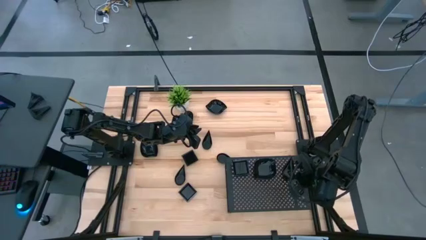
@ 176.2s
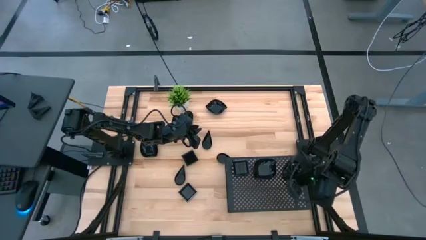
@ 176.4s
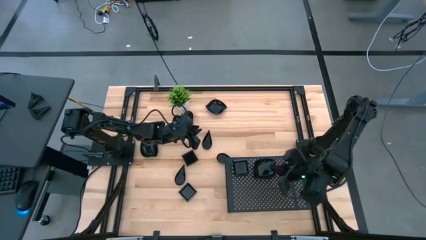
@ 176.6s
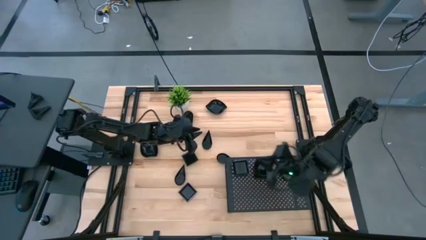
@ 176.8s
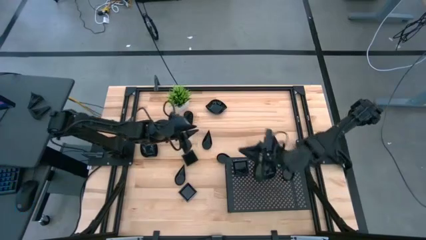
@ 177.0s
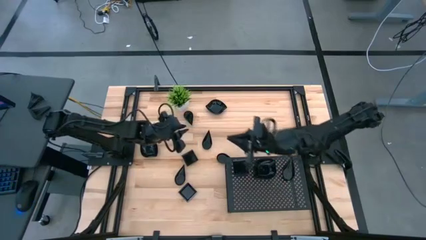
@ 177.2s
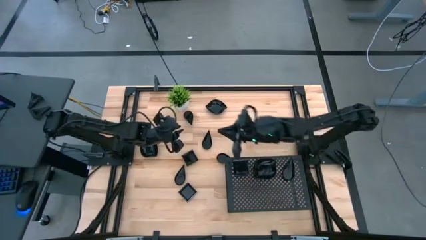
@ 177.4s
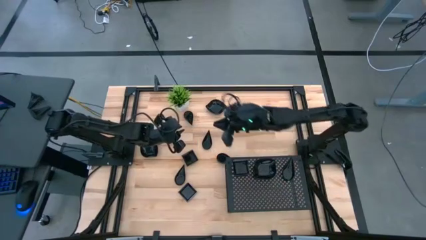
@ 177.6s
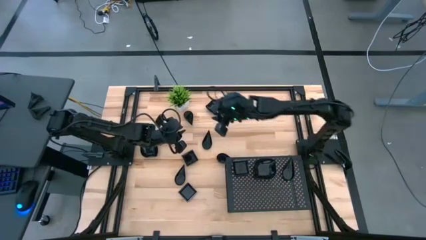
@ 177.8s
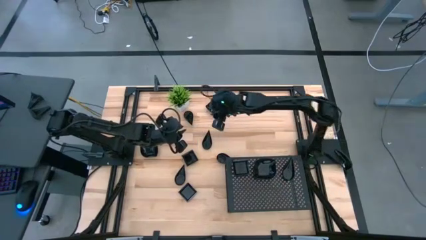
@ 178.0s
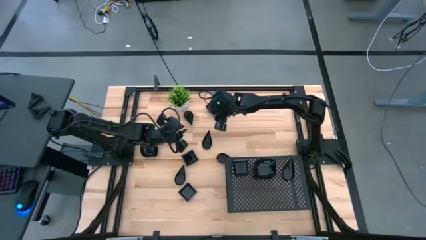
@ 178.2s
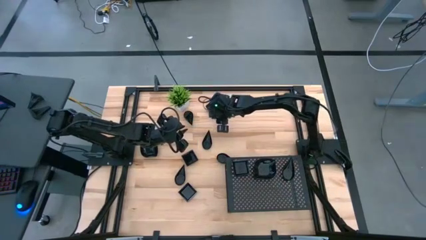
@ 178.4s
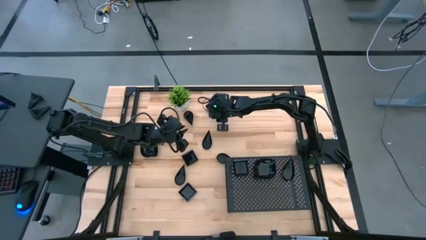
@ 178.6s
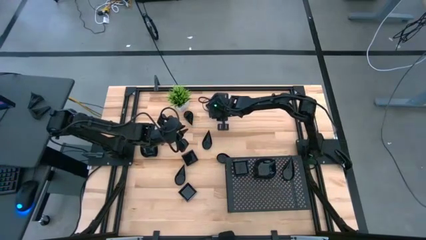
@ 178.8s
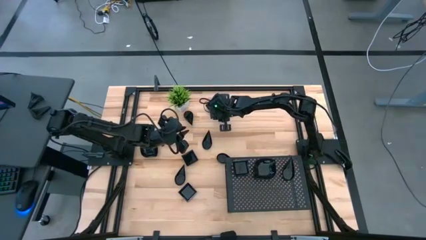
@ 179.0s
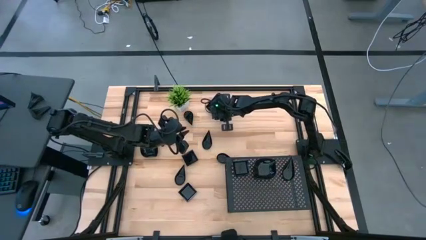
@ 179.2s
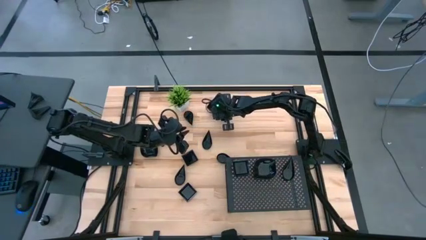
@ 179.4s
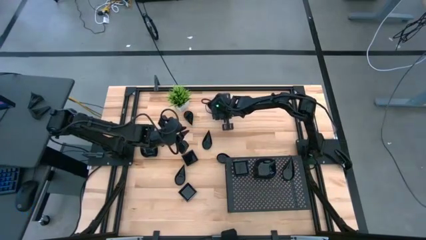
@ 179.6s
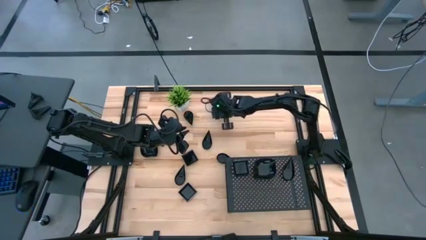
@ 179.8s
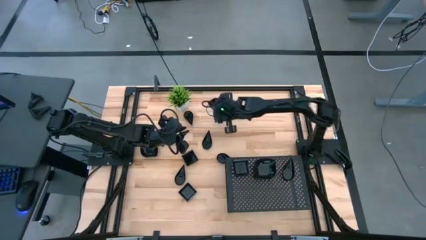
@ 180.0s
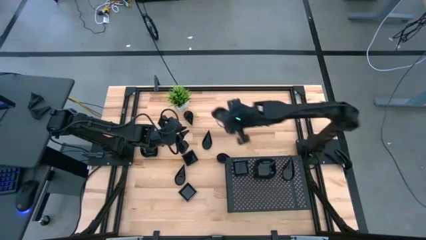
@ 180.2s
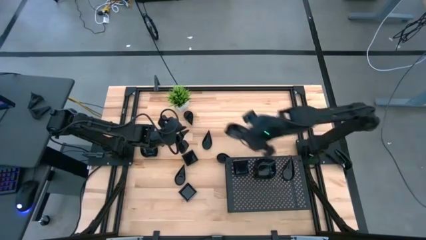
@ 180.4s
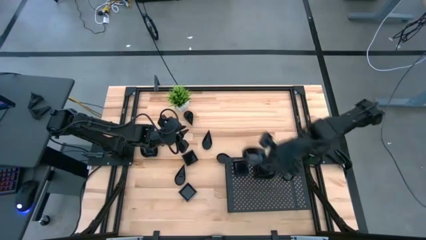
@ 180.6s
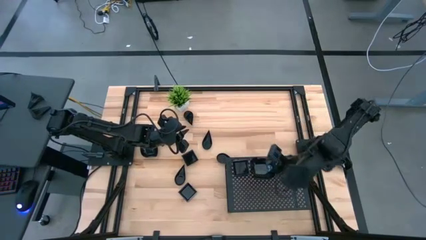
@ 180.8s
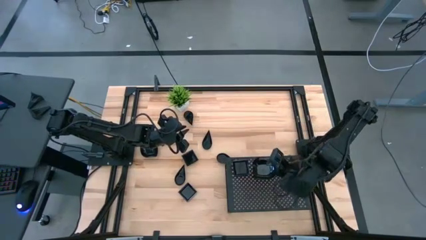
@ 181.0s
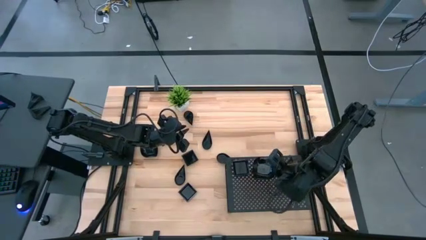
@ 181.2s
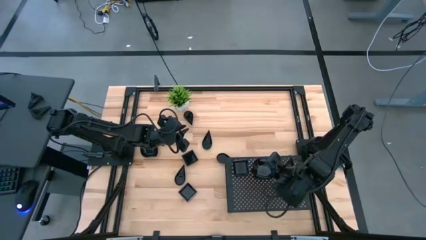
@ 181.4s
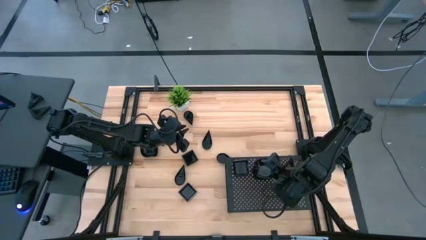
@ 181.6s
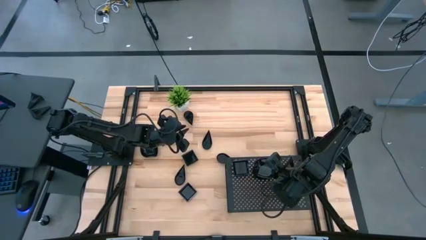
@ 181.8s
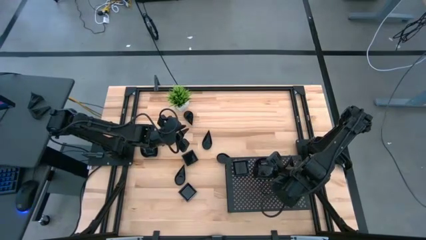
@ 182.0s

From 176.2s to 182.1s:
Task: Pick & Place Mini shaped plates
Stack the leaf shaped plate on top of the leaf shaped plate on the shelf

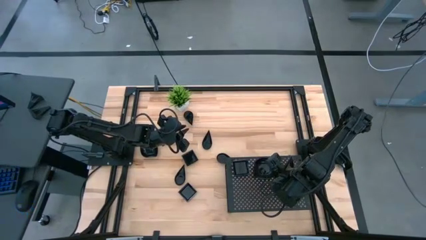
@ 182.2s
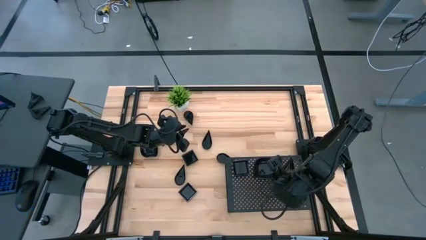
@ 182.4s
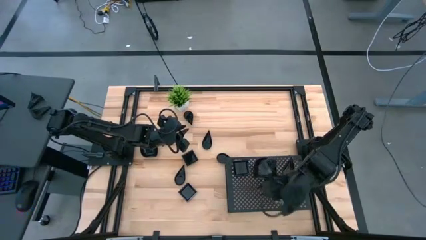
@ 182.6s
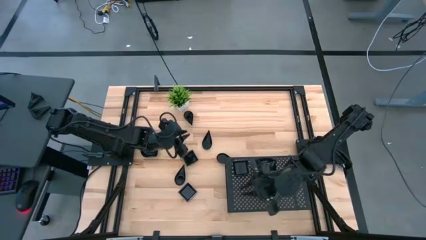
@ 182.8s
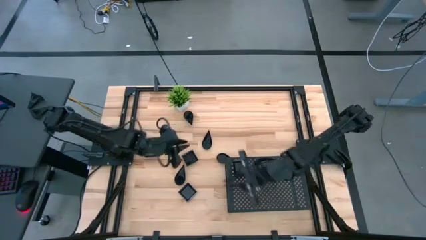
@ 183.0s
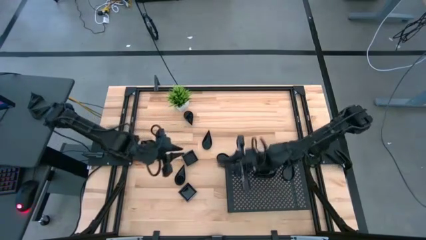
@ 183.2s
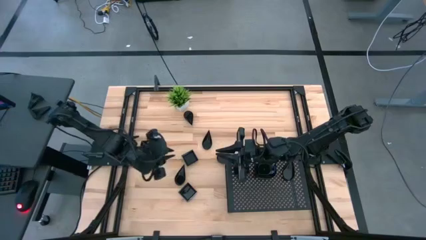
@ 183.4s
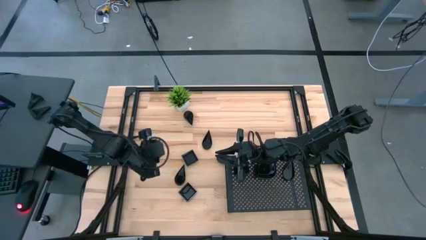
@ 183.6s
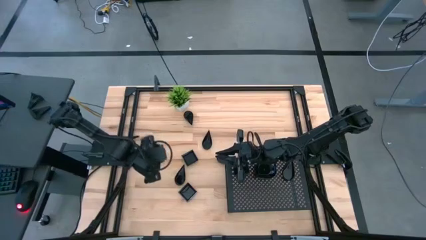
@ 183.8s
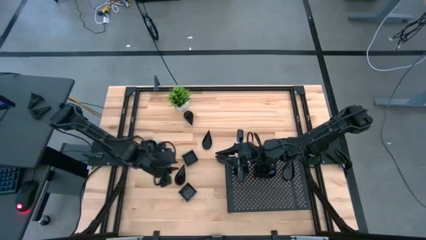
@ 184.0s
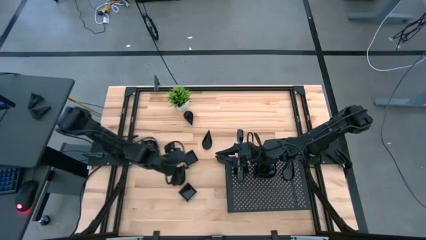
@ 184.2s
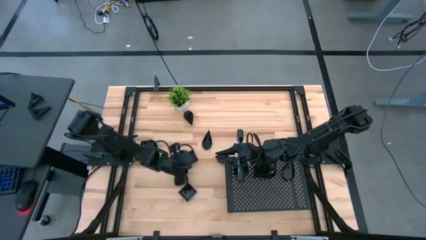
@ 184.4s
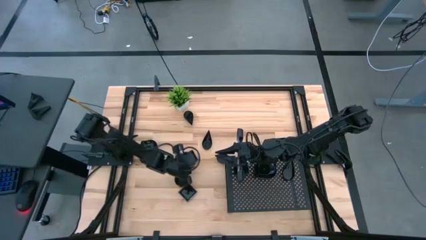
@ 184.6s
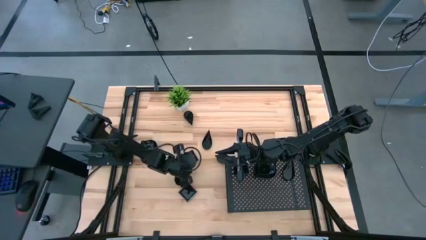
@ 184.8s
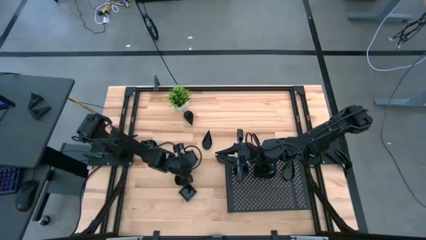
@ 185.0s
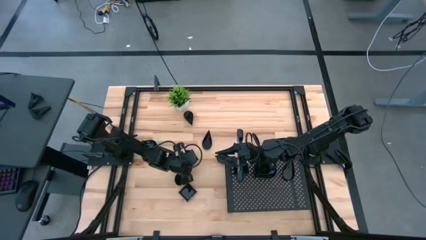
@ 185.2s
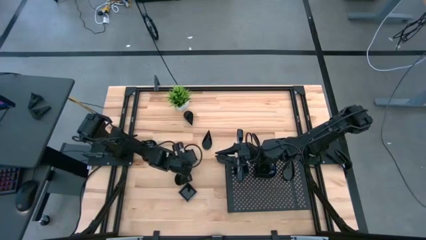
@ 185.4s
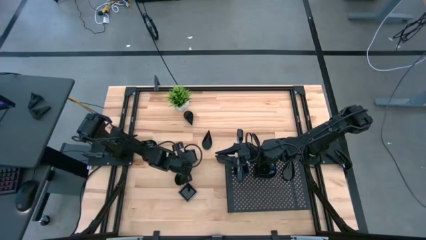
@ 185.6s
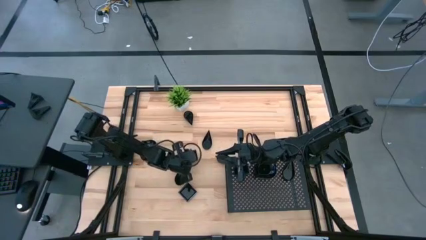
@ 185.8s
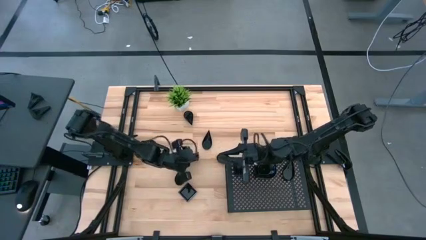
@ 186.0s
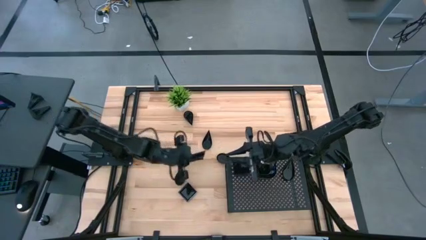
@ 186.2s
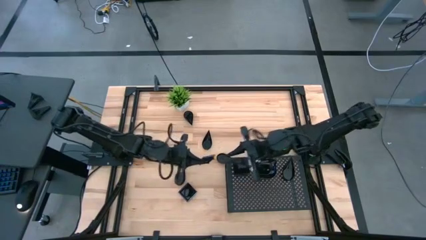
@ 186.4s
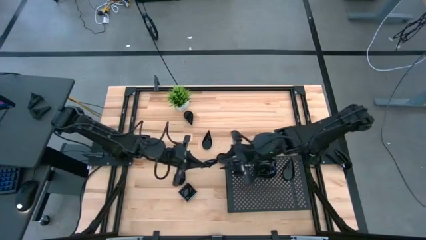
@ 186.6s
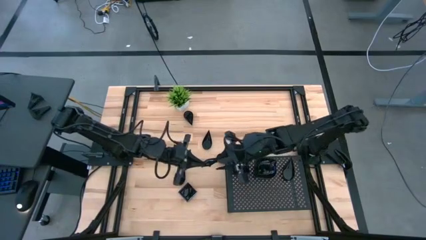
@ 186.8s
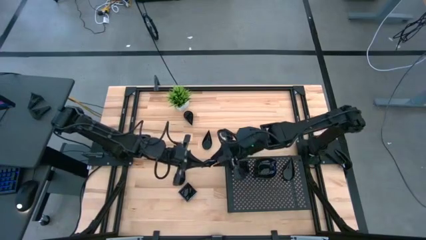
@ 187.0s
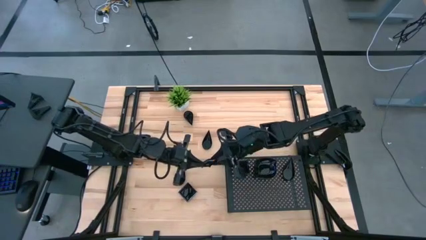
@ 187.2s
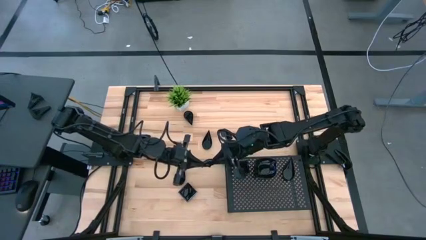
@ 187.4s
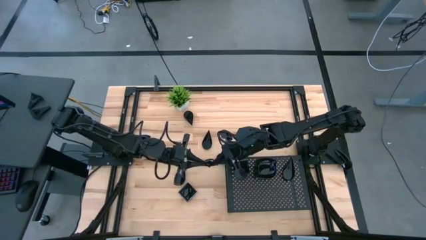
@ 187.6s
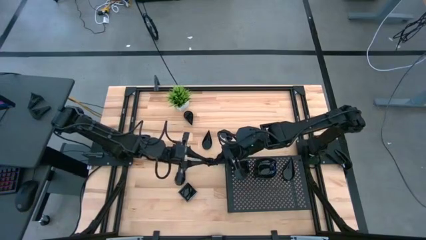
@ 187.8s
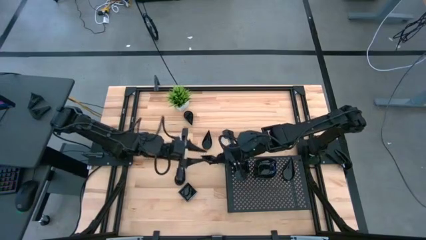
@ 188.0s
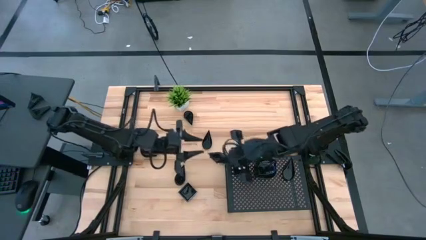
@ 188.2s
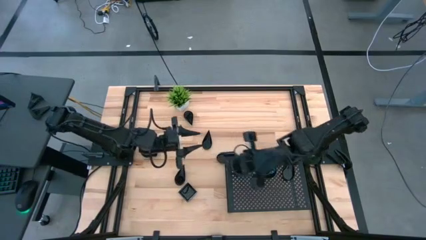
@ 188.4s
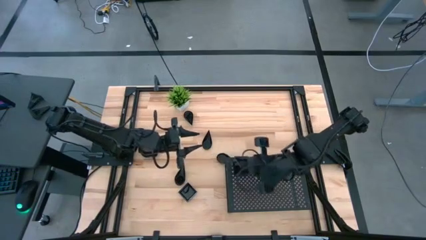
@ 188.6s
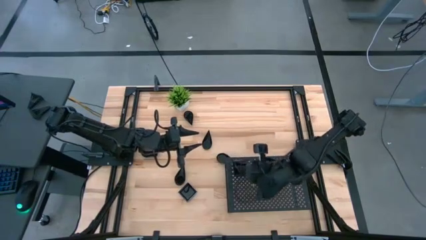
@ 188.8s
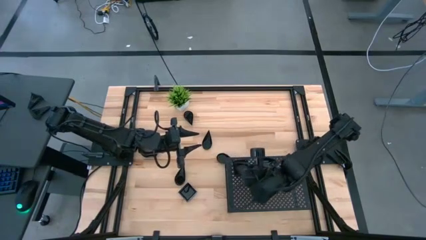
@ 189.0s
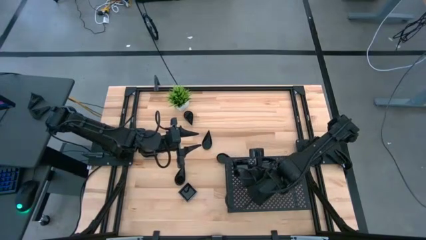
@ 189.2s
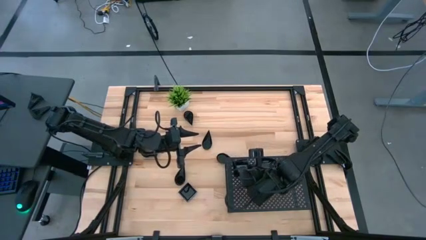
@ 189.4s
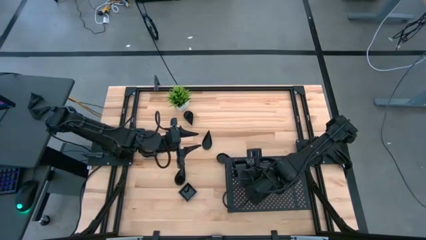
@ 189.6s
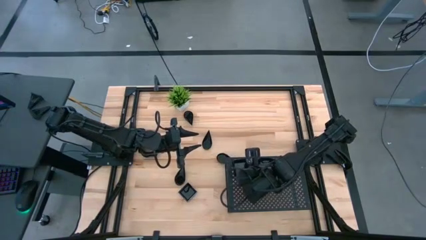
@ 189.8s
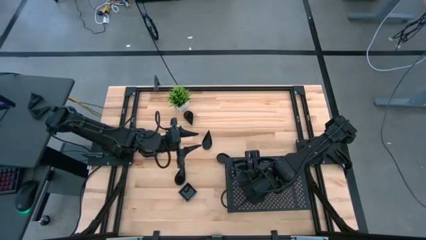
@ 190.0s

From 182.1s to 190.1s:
Stack the square plate on top of the square plate on the shelf

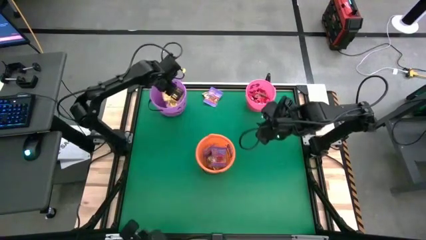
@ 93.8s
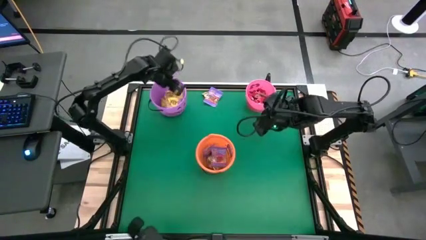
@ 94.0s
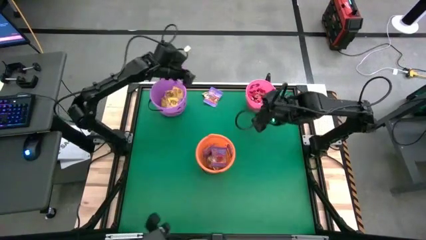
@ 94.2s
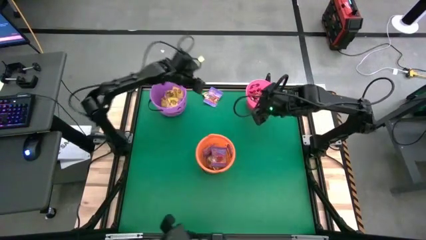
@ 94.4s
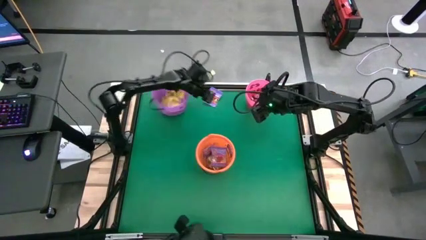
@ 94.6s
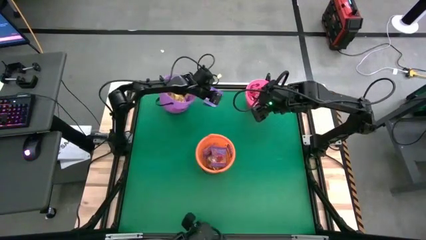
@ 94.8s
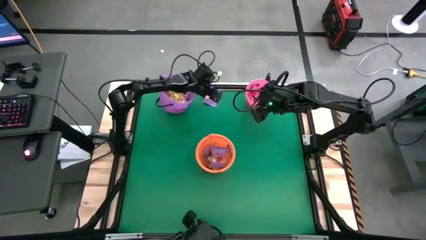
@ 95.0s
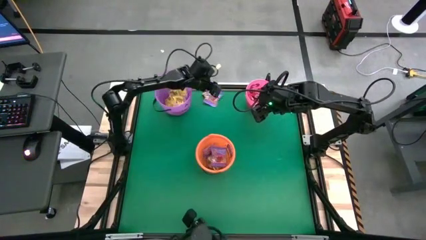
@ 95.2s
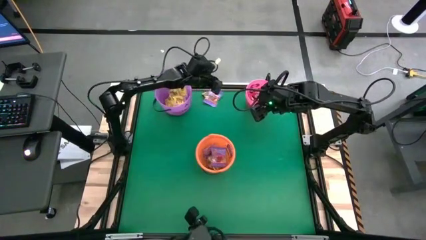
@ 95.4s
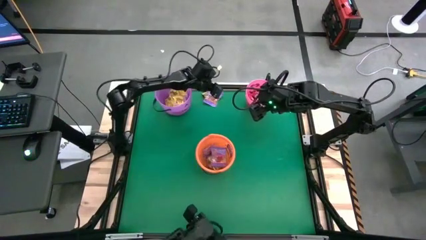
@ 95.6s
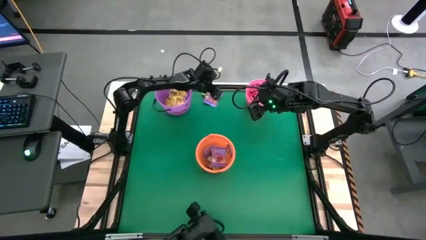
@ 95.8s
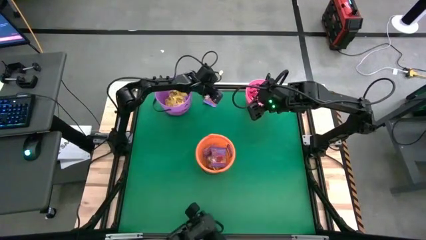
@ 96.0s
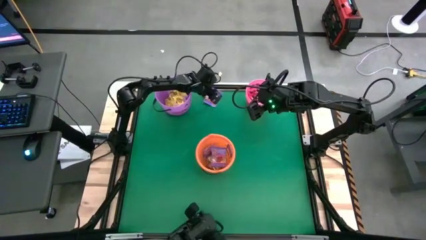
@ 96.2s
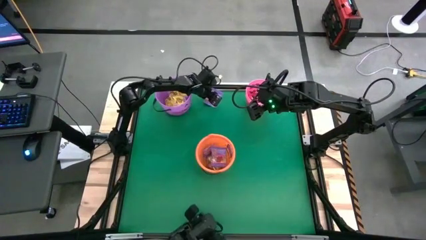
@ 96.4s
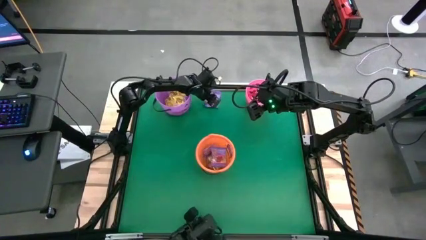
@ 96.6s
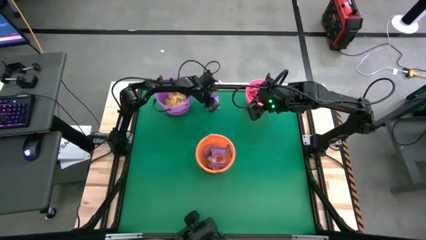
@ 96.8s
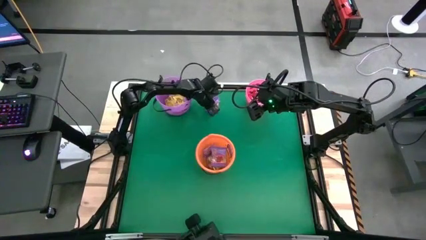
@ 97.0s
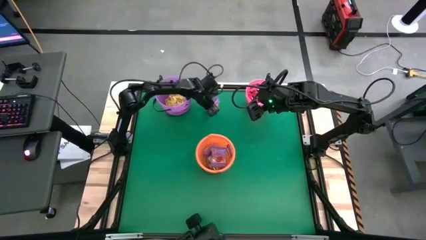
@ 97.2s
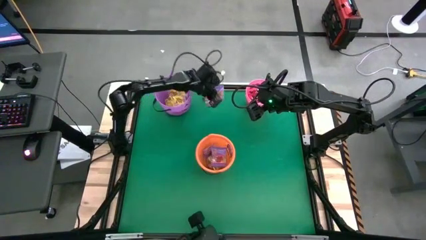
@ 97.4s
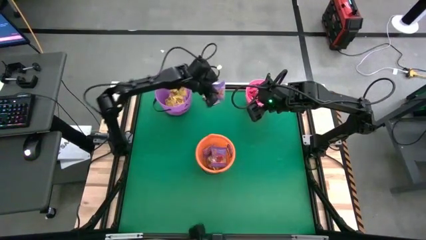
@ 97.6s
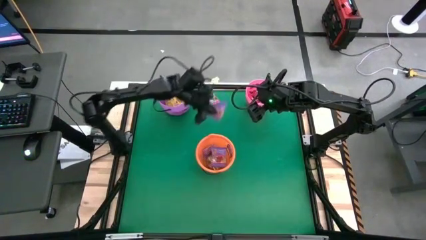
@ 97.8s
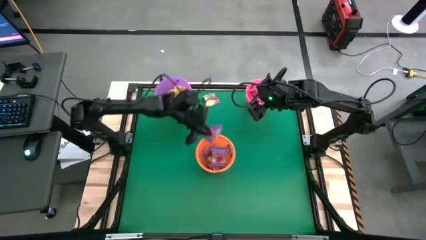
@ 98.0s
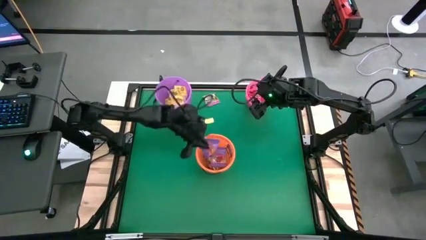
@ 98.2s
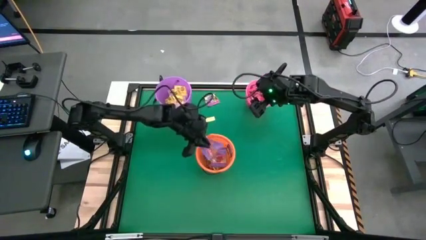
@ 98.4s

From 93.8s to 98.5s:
Task: Sort candy by brand, put in halloween buckets
Put the violet candy into the orange bucket
